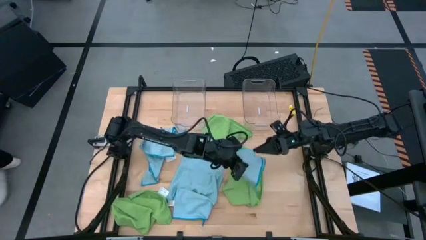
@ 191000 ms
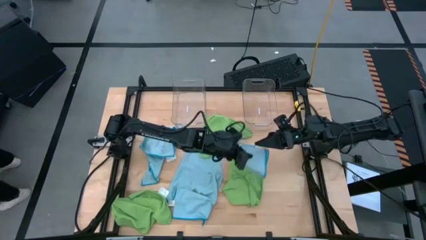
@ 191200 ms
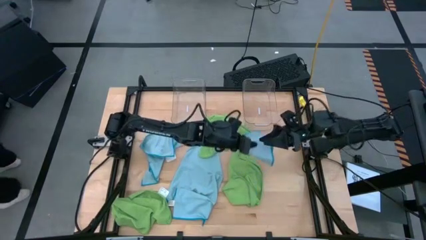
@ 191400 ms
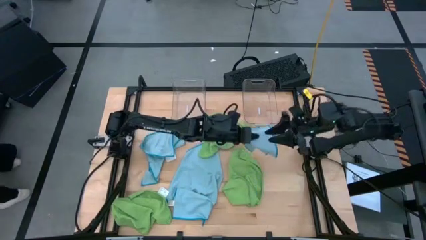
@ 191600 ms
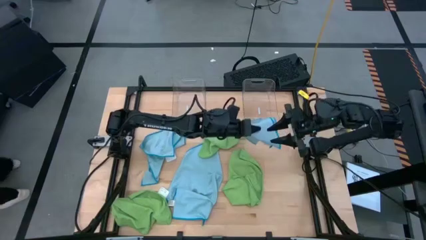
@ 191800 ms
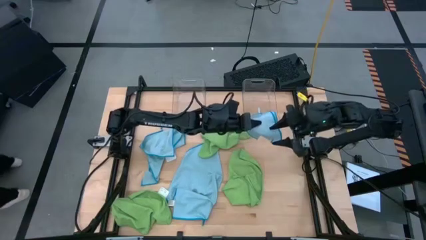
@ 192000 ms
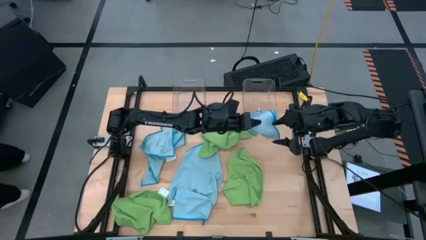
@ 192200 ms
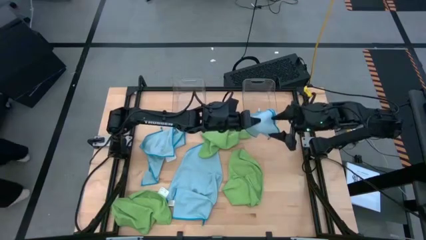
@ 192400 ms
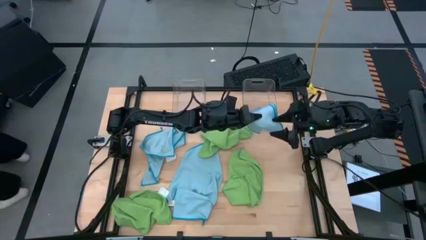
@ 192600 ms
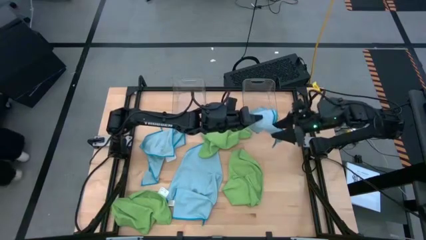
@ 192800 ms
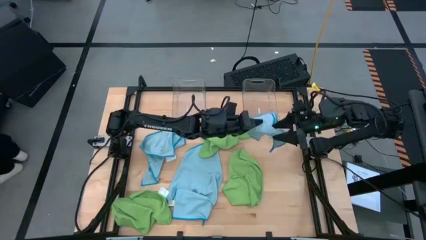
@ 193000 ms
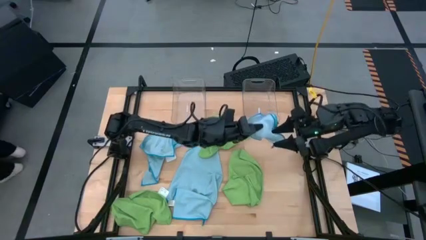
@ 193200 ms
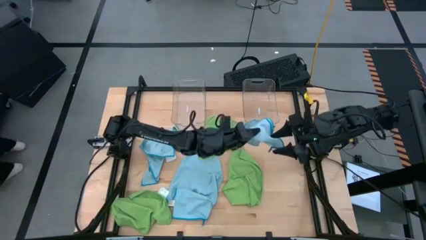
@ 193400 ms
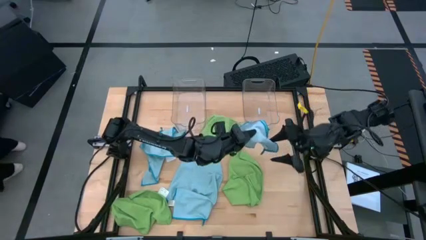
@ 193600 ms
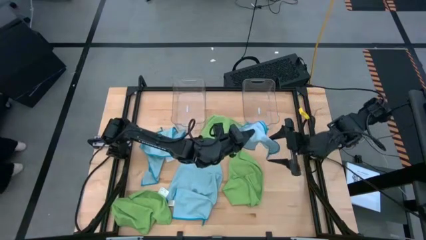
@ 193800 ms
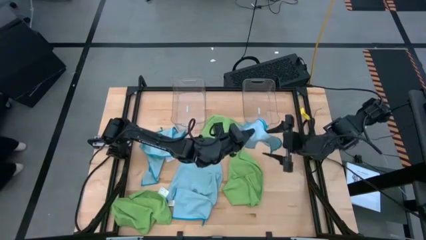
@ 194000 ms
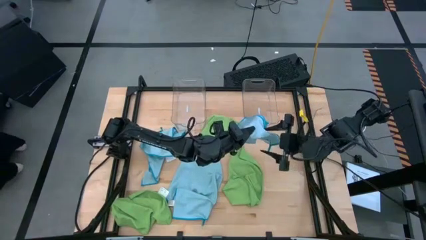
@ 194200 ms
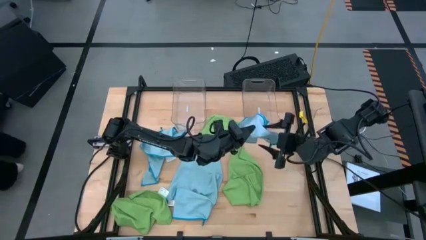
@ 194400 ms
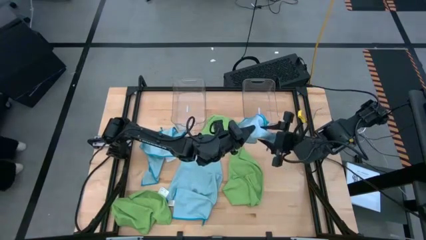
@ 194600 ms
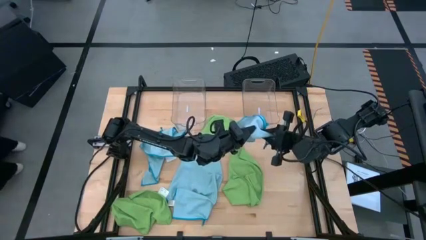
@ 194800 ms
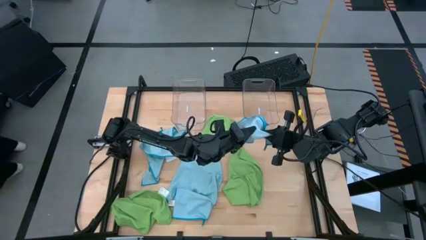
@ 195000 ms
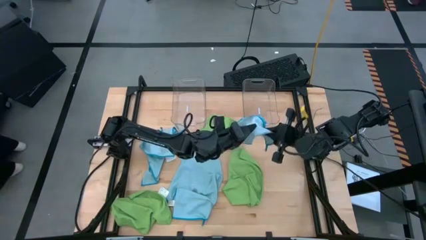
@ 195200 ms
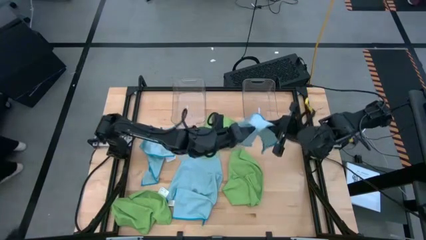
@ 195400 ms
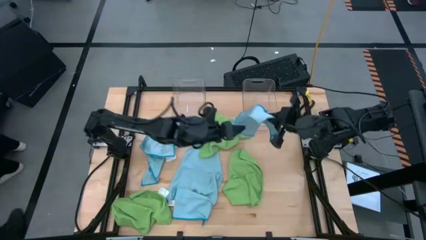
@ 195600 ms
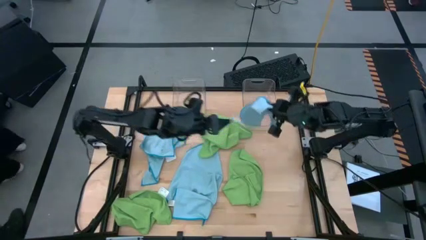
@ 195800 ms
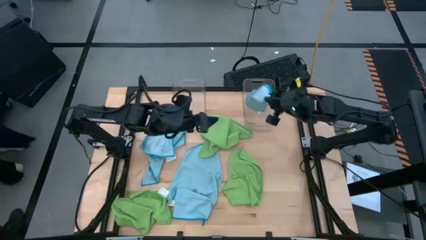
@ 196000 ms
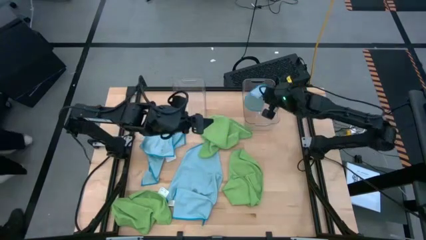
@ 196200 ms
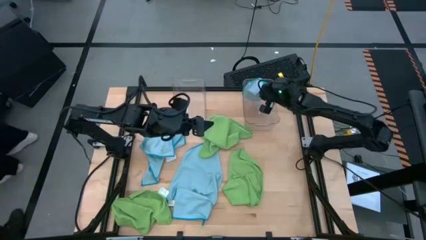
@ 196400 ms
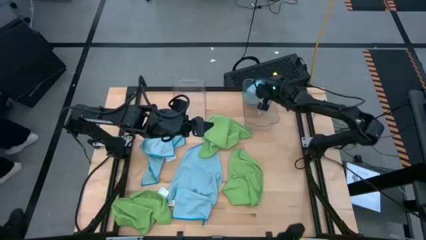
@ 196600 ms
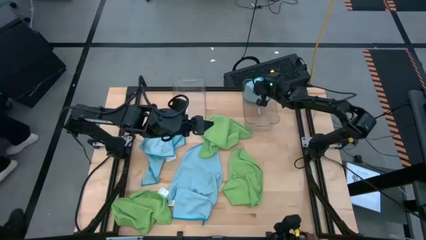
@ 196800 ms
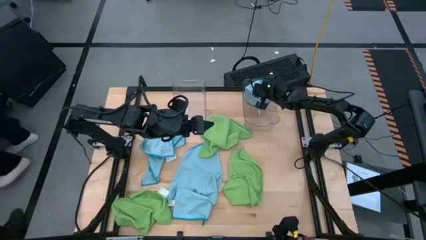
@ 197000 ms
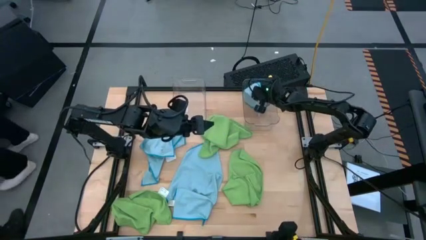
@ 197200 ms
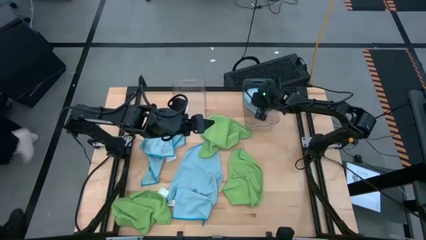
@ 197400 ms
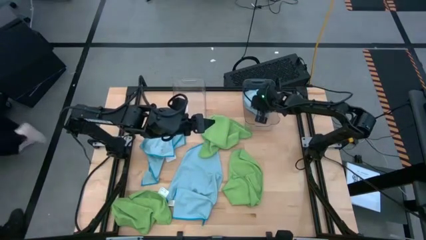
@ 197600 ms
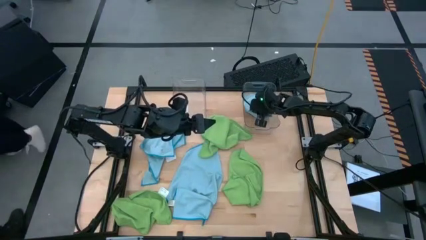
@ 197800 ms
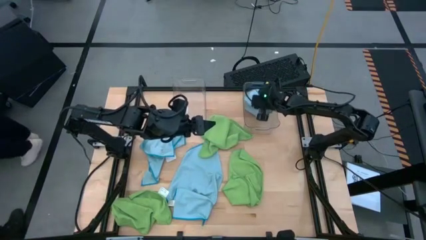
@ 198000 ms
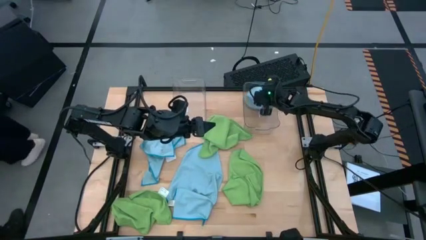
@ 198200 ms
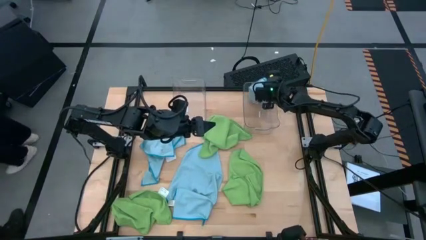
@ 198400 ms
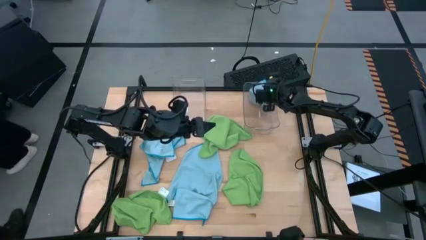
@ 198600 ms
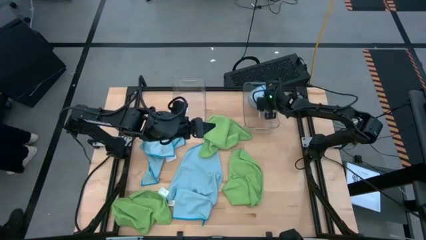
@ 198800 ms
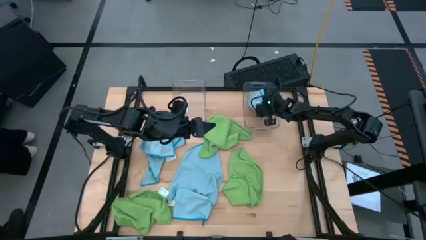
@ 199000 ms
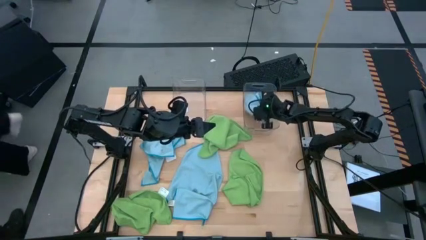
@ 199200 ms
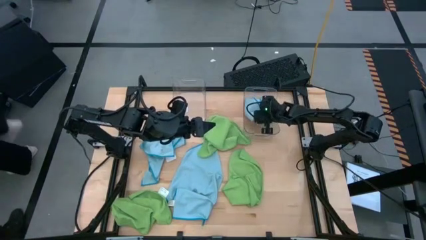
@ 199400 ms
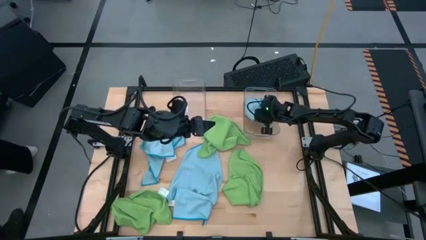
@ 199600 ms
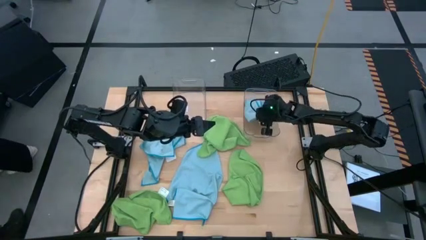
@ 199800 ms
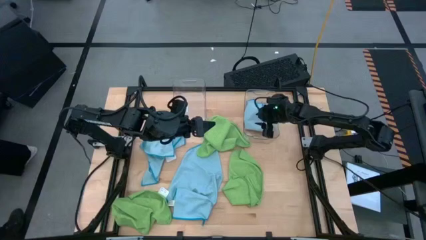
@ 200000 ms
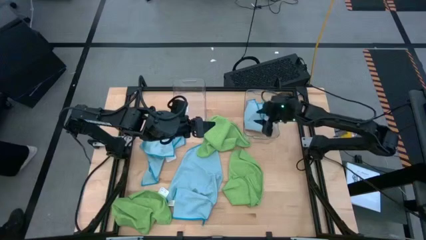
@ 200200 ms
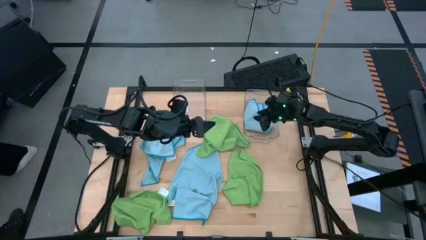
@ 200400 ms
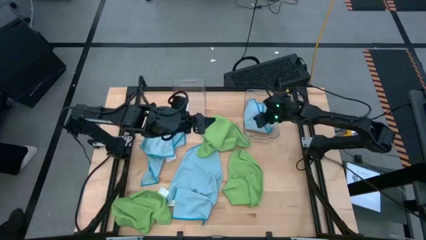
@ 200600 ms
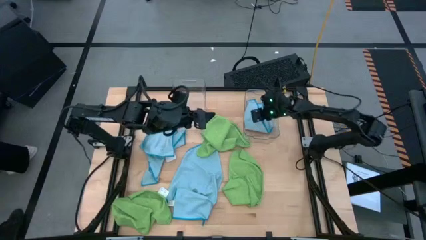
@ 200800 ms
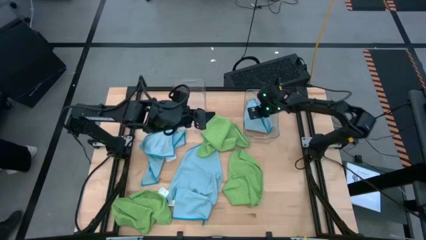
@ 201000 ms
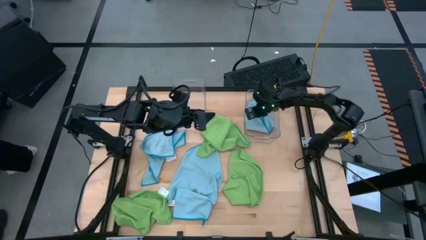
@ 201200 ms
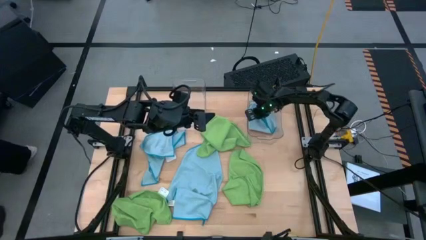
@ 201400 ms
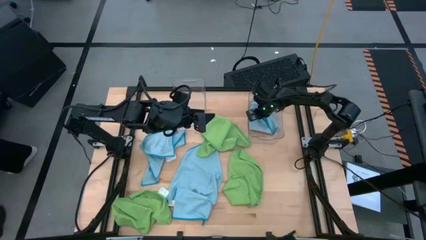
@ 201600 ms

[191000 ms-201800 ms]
Task: Fold microfiber towels
Put the right blue microfiber towel into the right transparent bin

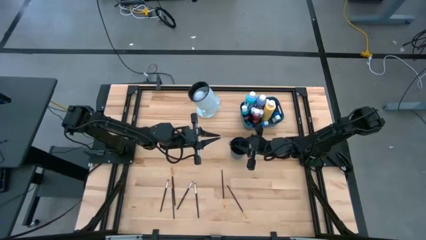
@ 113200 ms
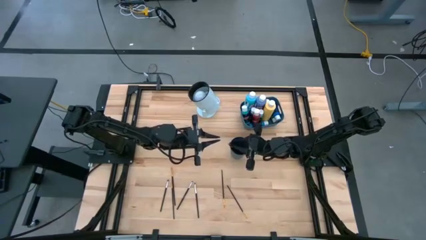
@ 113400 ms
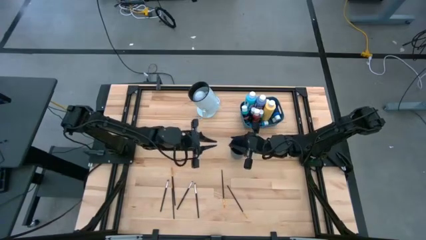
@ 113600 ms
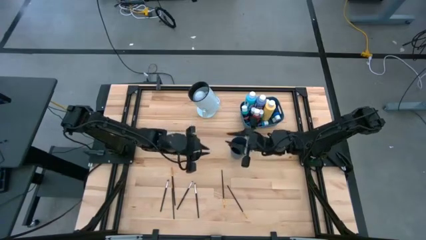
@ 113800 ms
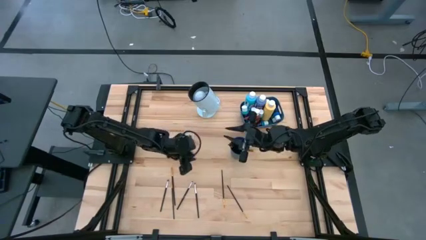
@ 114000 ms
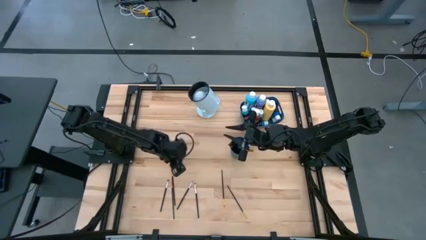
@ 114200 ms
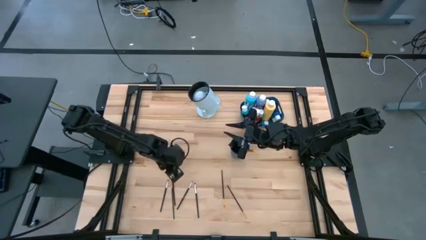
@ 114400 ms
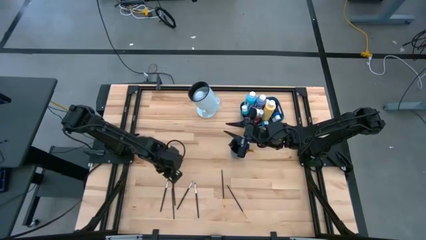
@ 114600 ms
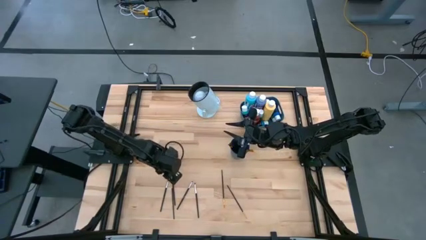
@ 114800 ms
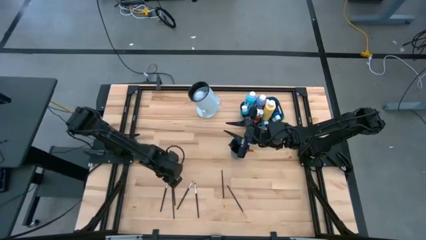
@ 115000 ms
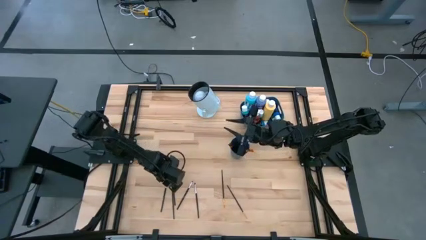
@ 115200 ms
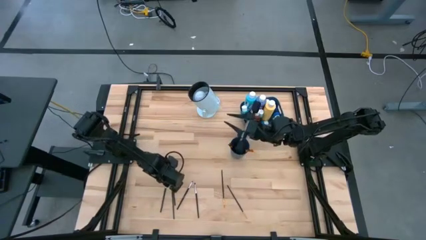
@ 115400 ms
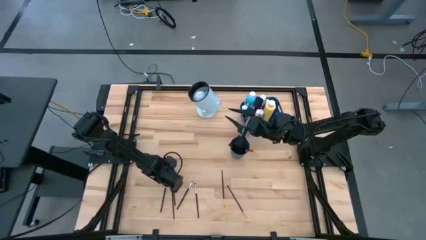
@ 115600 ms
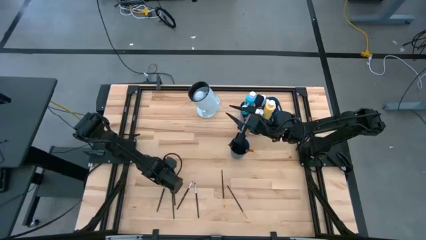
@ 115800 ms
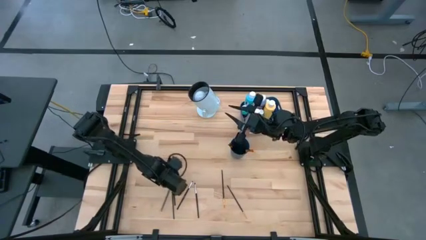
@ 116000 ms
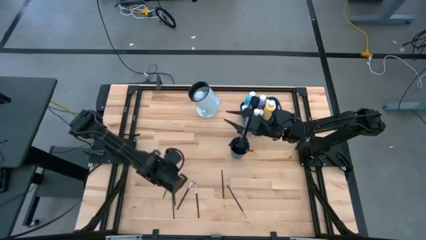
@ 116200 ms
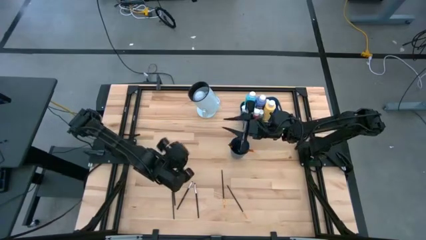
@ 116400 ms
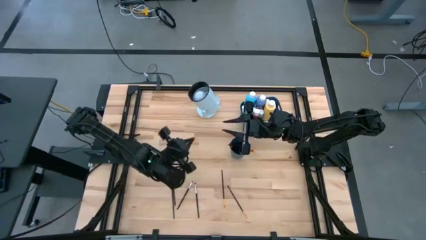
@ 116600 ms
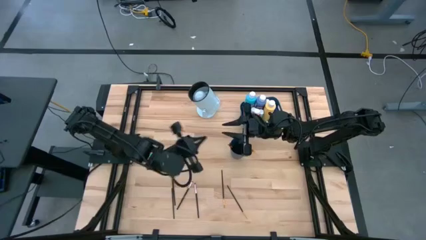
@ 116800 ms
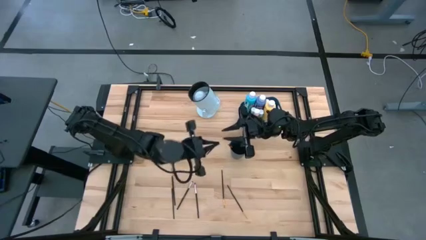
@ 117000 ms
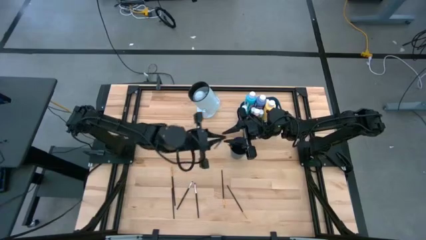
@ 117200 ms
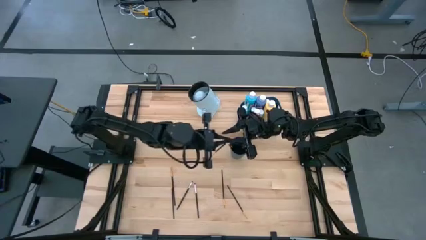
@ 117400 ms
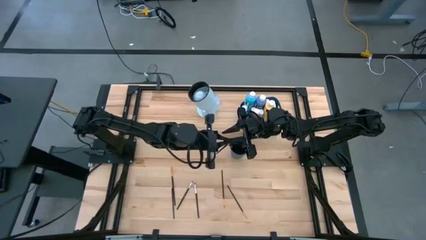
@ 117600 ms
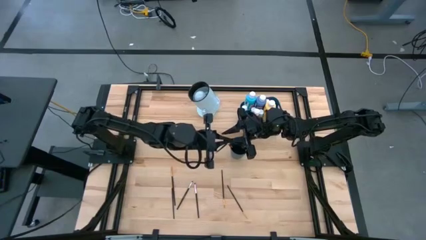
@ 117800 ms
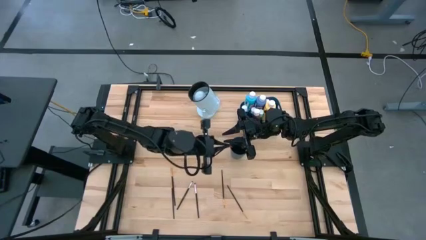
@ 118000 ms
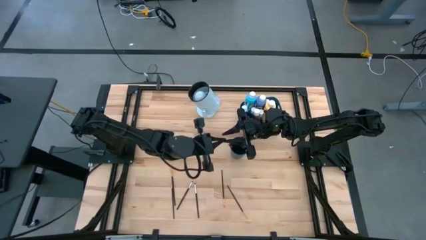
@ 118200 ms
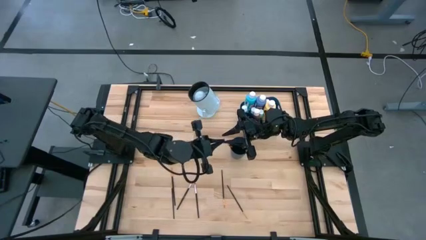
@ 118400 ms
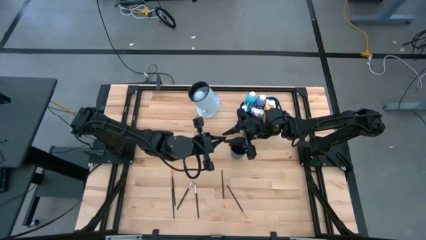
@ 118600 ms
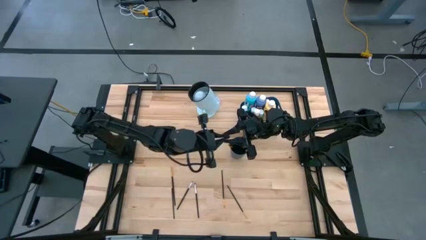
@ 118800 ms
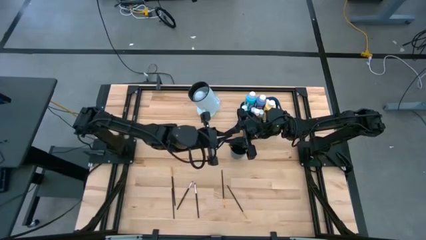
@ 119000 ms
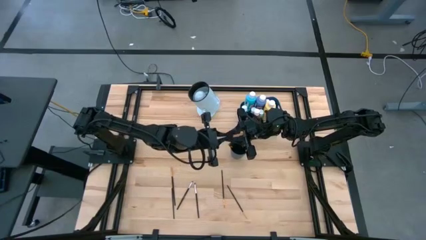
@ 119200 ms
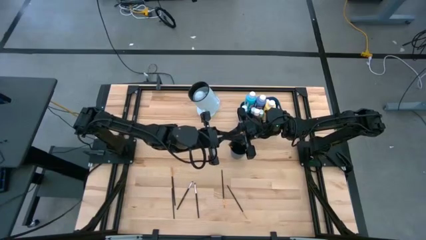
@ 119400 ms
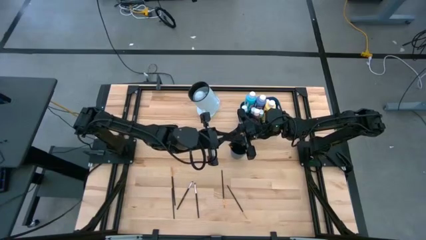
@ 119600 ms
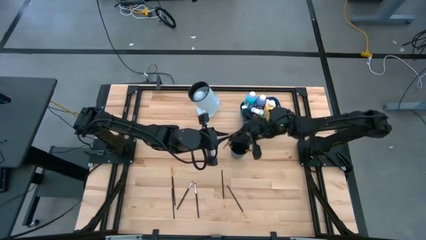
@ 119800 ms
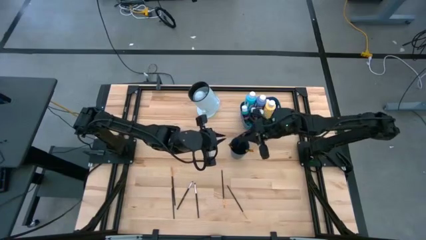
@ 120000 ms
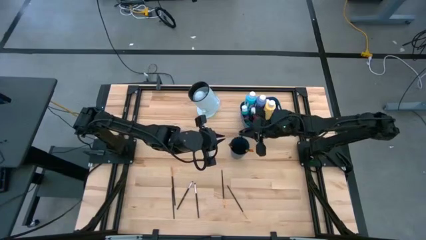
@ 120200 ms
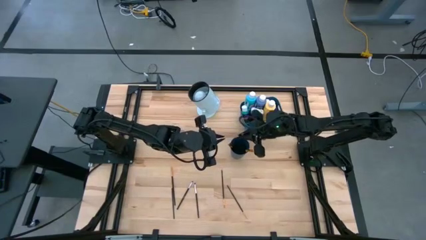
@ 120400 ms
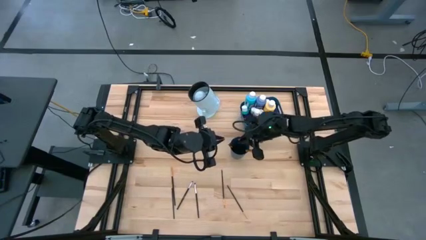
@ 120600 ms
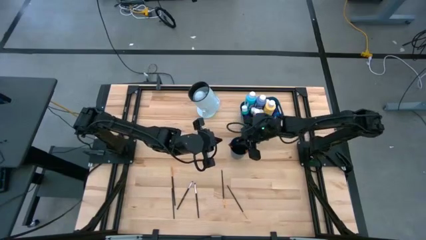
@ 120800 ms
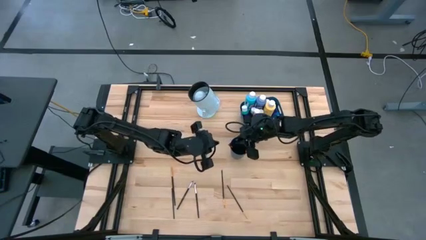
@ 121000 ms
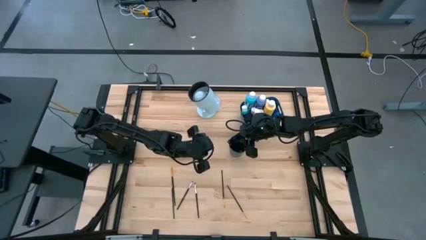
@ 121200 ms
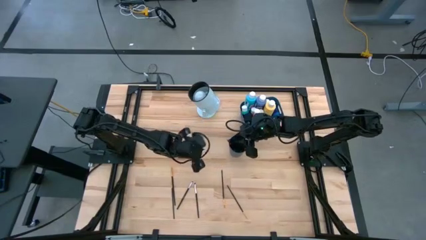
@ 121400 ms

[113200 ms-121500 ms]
Task: Pick & Place Paint Supplies
Put the silver paintbrush into the blue cup
